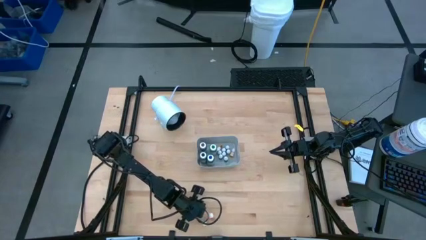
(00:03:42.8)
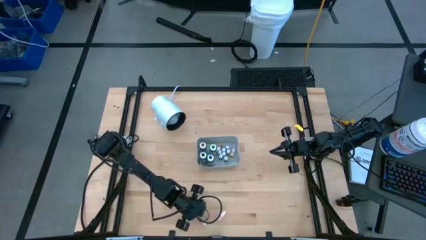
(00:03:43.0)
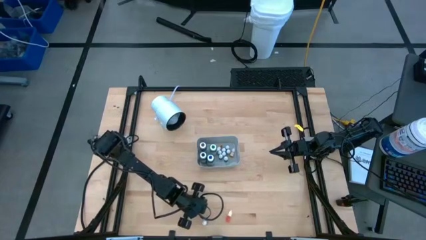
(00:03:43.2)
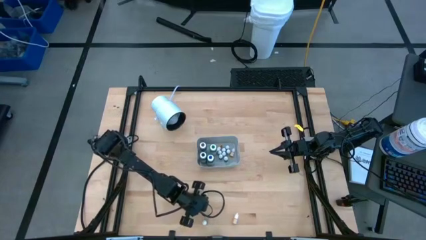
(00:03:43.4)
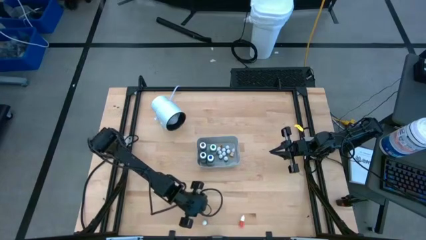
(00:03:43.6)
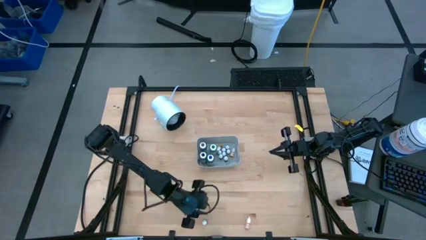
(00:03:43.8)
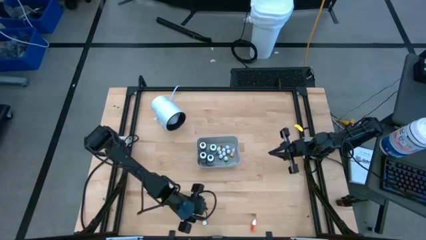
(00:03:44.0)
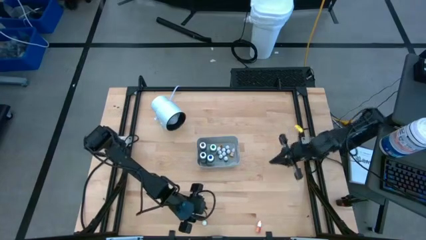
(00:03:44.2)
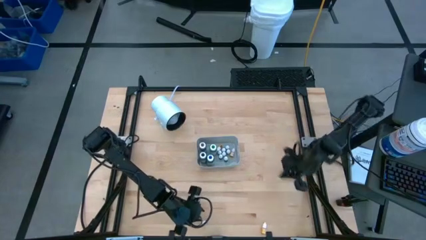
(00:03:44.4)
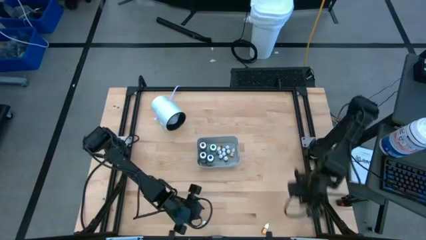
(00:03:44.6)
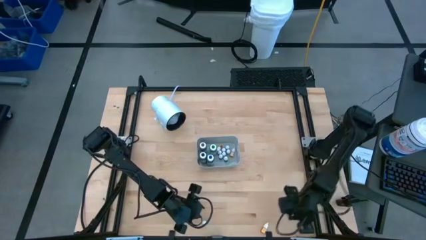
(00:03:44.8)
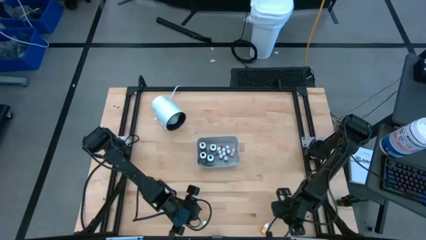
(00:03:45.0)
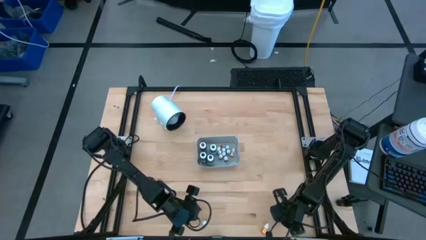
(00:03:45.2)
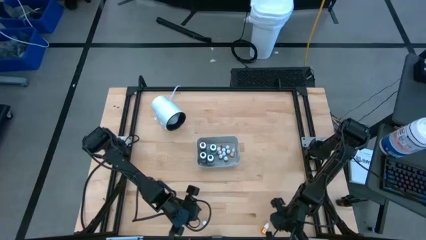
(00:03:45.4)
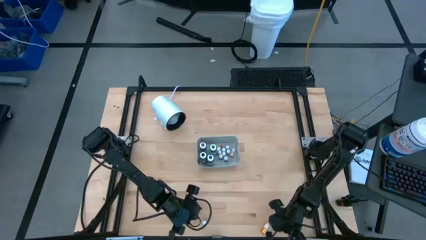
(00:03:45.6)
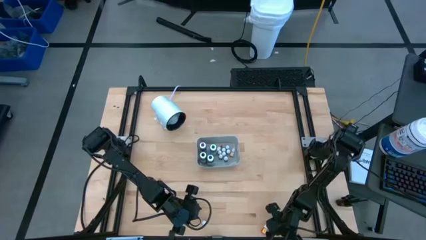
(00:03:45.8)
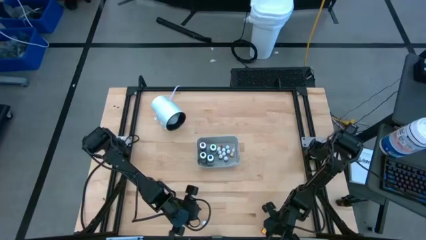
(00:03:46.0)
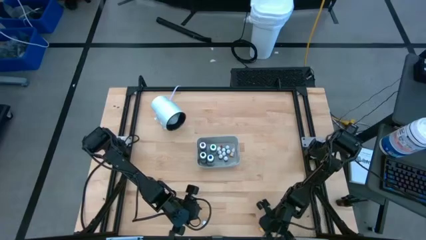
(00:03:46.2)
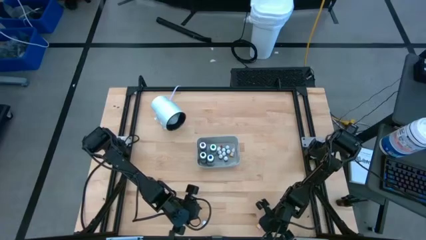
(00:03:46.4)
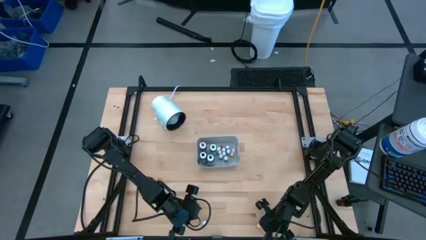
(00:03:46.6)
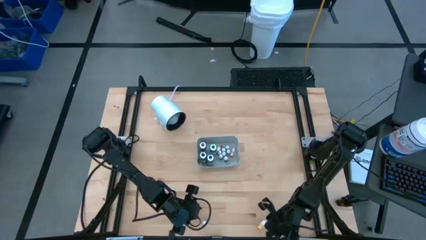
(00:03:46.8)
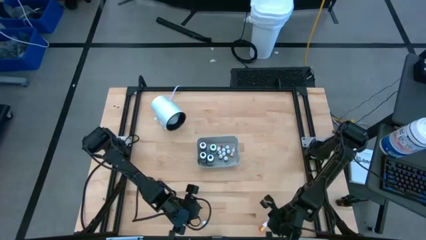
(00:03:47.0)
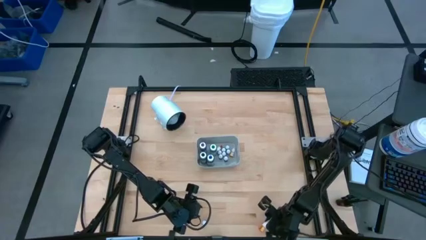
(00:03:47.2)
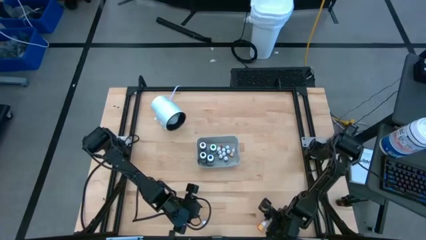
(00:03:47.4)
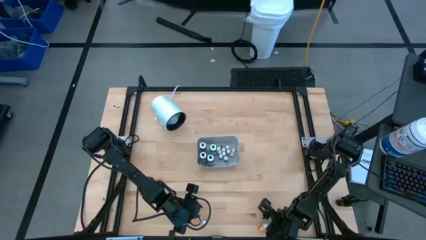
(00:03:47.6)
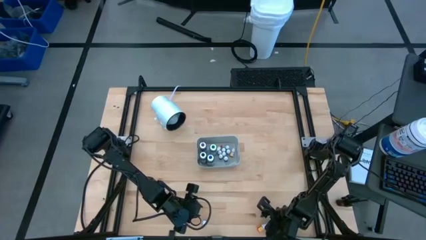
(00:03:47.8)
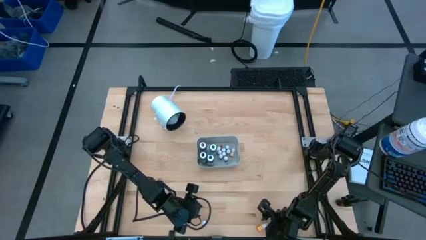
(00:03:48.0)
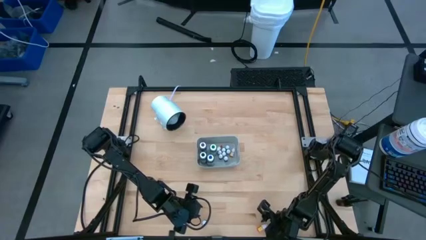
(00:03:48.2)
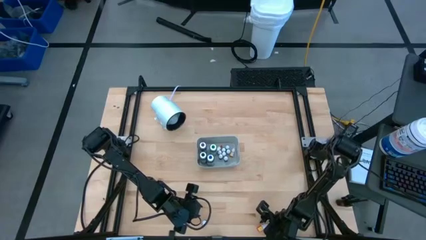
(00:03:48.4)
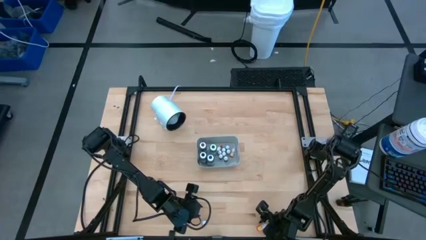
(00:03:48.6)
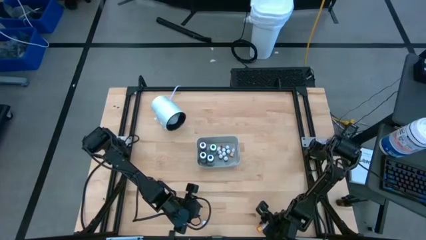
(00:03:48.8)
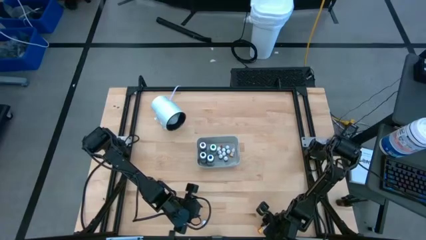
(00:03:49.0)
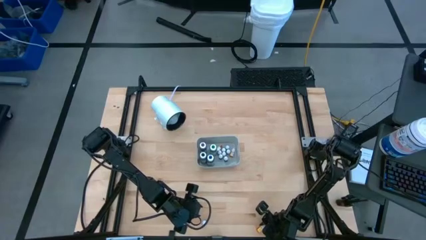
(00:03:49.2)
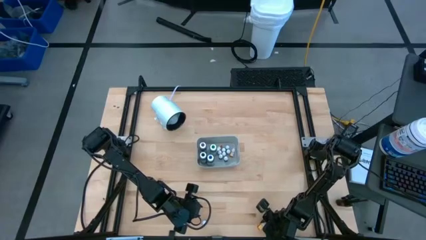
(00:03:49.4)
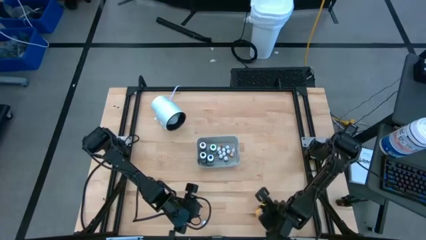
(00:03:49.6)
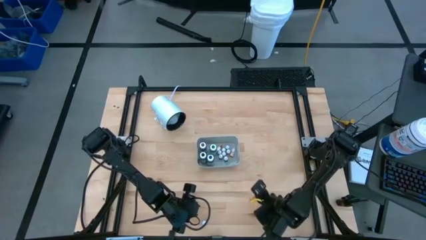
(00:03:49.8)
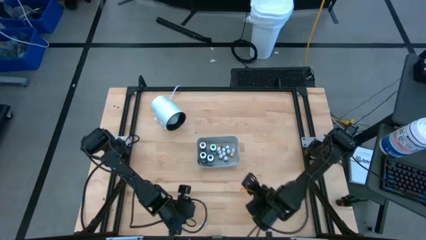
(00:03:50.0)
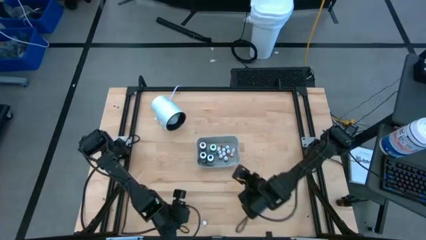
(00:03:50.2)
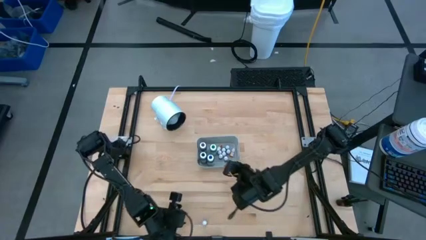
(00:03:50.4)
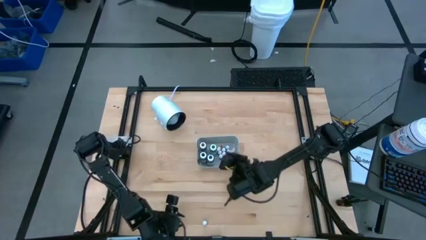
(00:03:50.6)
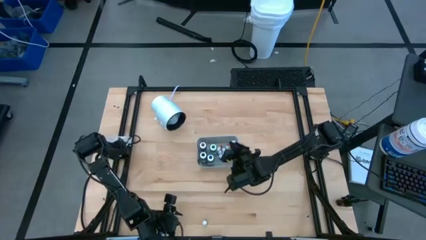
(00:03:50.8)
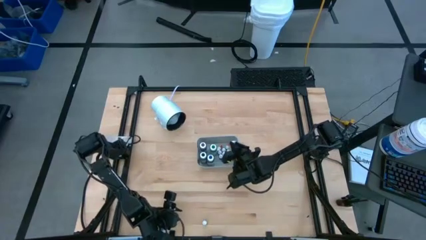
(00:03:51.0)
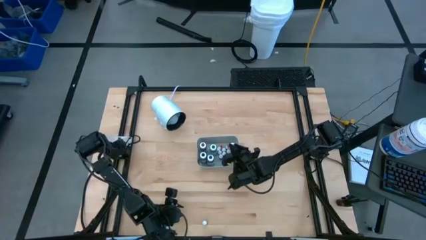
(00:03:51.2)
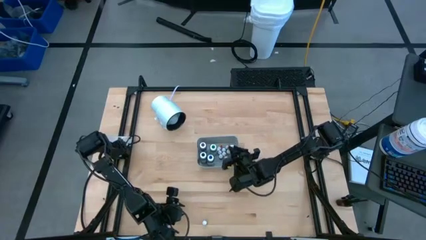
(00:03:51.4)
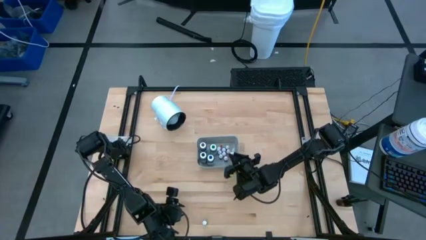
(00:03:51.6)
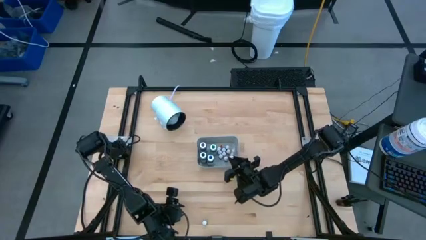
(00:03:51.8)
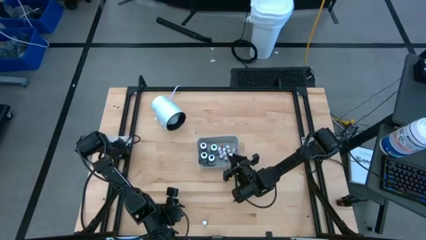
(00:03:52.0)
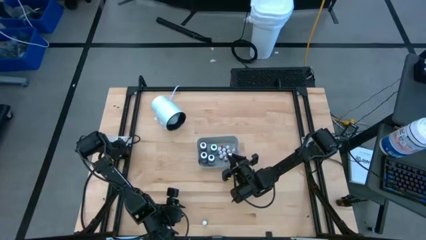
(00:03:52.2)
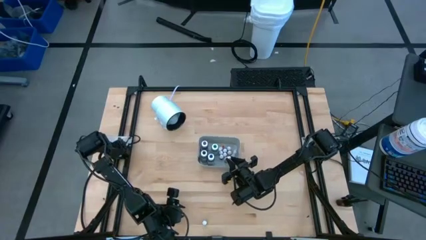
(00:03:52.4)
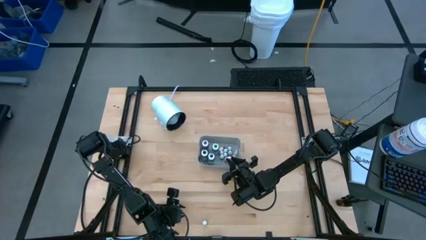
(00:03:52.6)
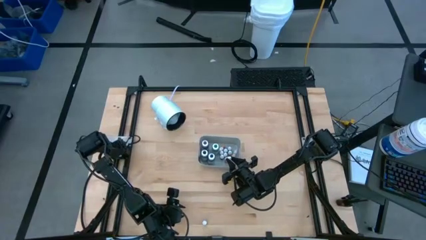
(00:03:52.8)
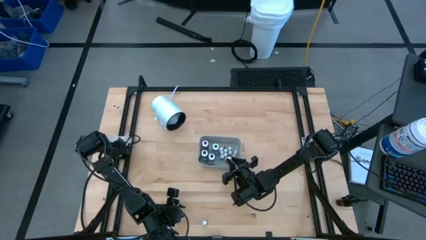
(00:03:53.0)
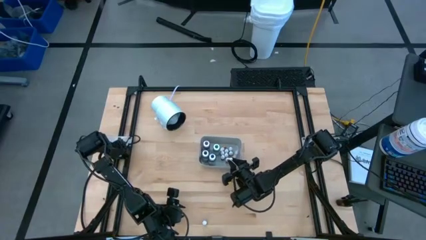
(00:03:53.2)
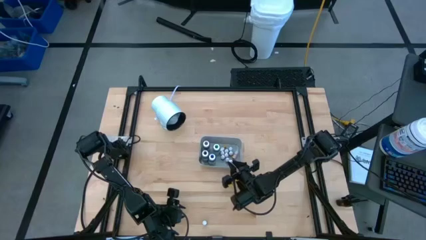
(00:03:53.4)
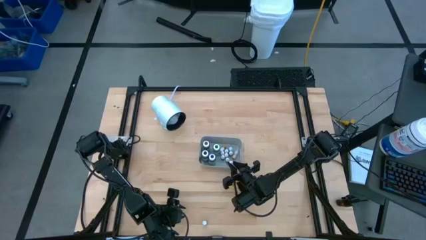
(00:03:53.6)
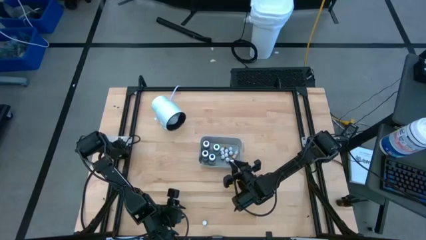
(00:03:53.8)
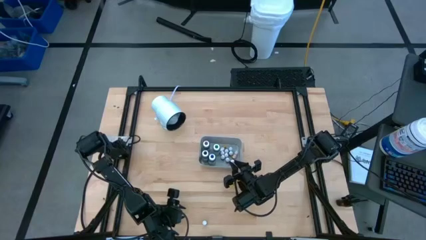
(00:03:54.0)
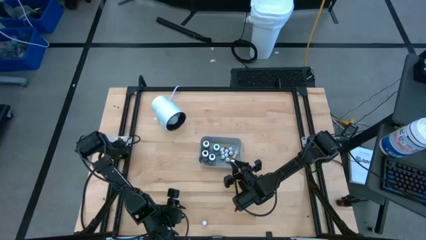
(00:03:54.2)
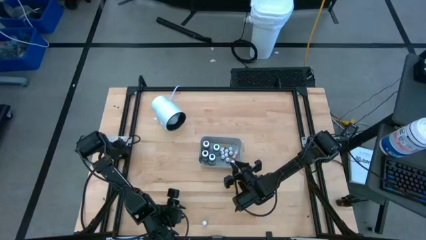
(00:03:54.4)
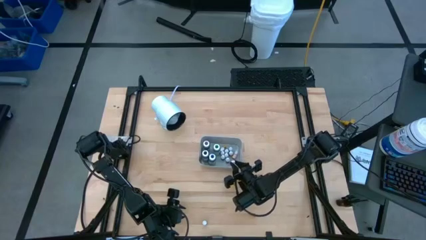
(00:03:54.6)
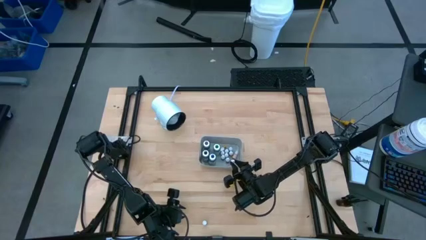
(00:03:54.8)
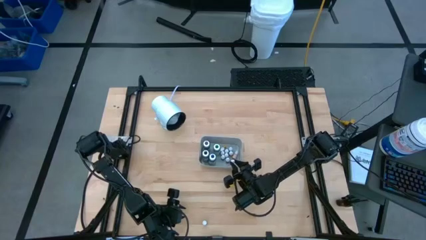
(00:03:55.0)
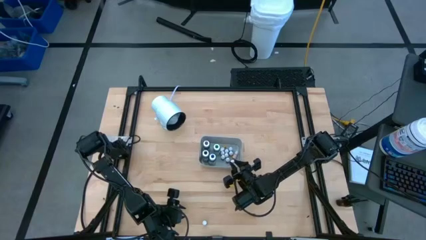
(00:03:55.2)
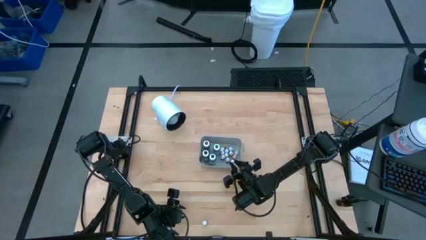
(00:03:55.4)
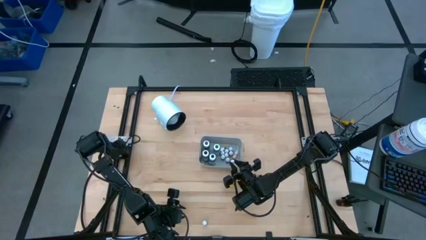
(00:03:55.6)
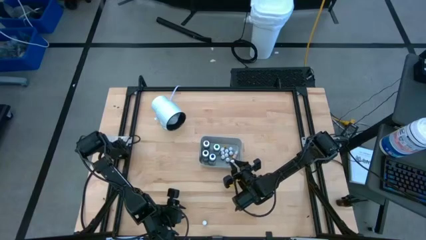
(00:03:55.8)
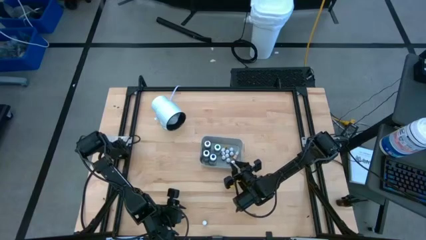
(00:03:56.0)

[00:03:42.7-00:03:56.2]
Task: Pick & Place food coloring
Put the small orange food coloring bottle into the gray bin
